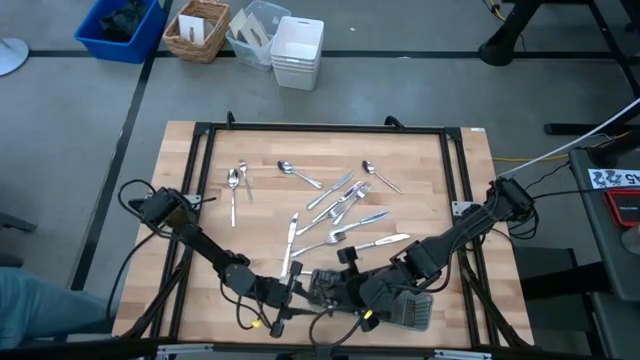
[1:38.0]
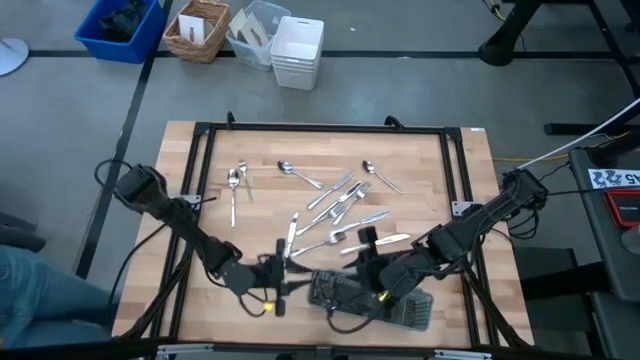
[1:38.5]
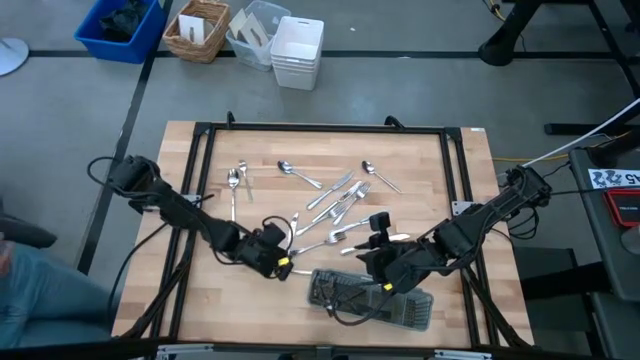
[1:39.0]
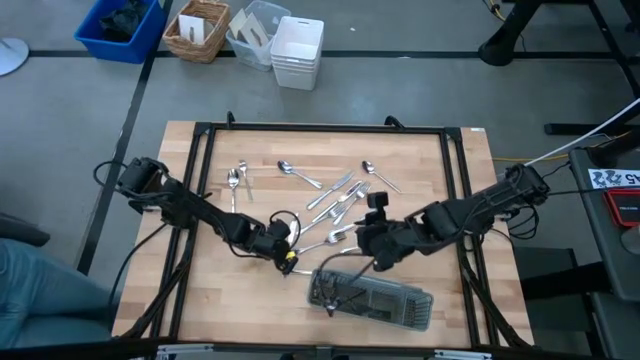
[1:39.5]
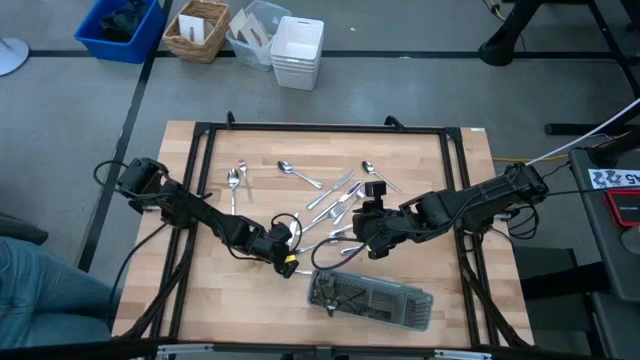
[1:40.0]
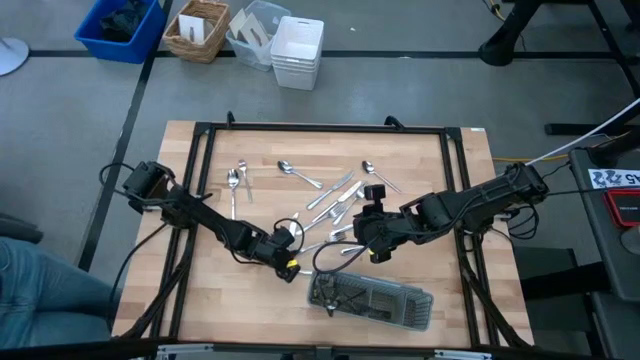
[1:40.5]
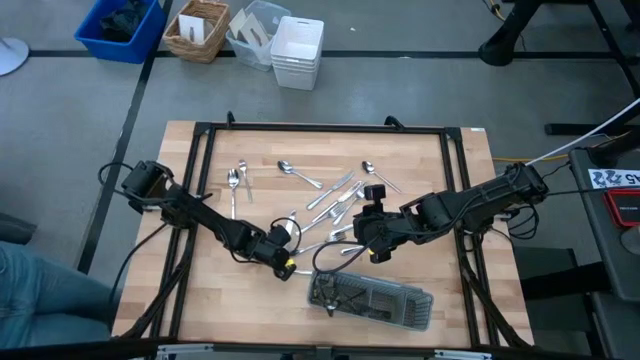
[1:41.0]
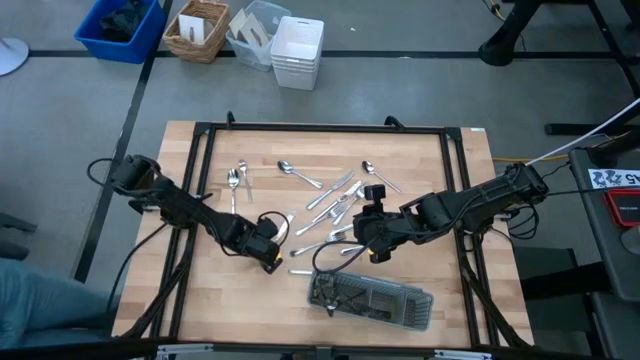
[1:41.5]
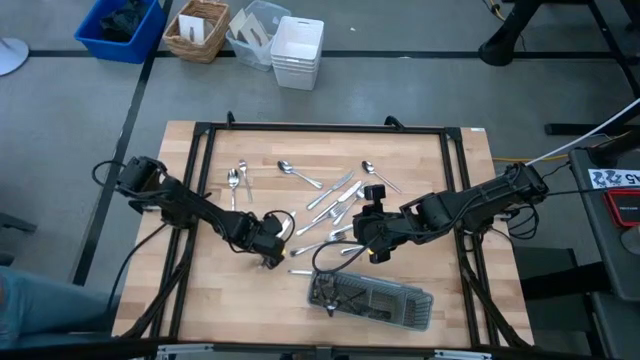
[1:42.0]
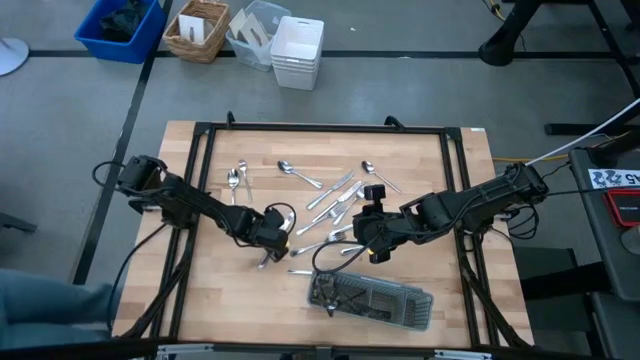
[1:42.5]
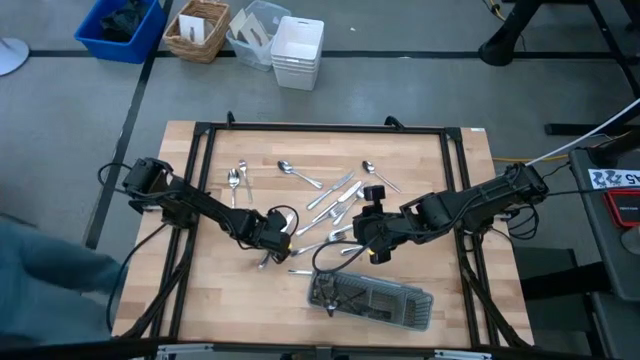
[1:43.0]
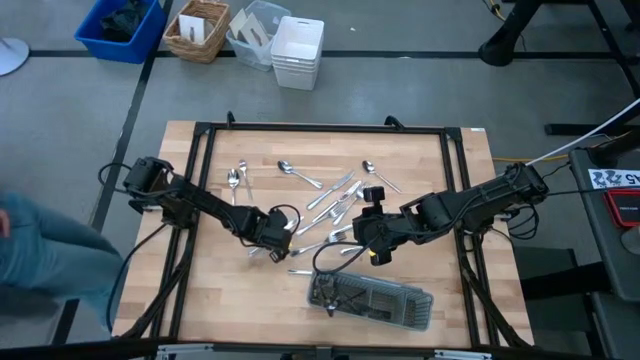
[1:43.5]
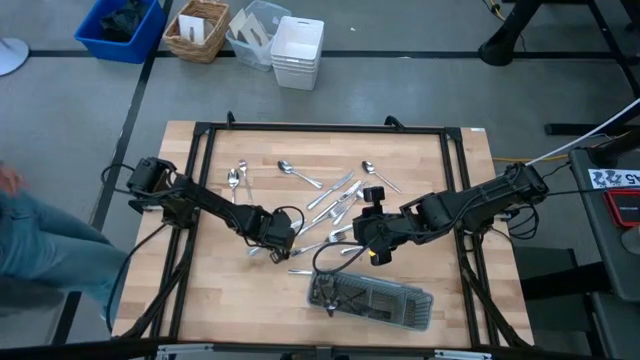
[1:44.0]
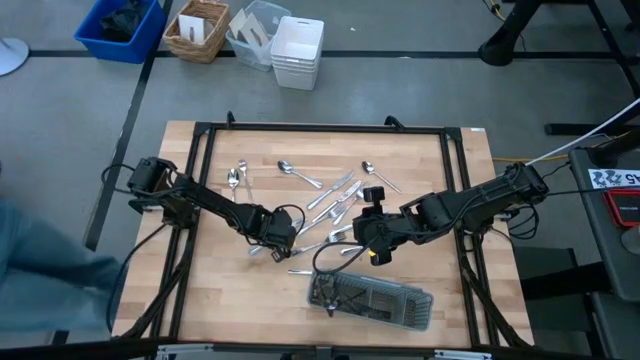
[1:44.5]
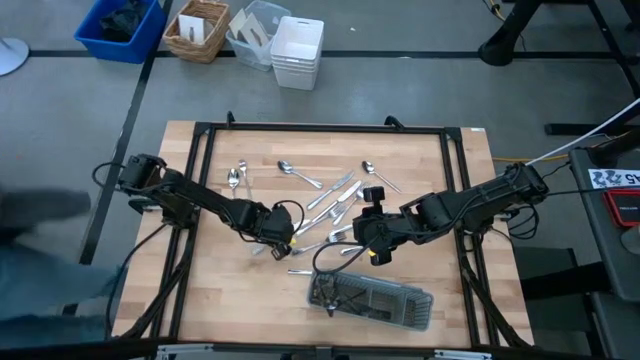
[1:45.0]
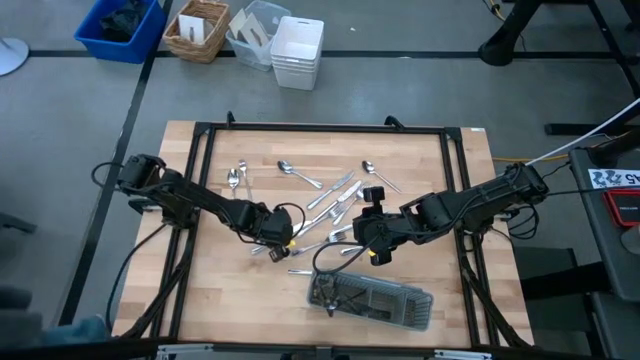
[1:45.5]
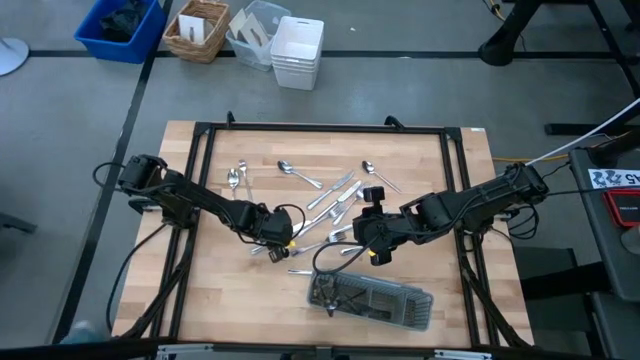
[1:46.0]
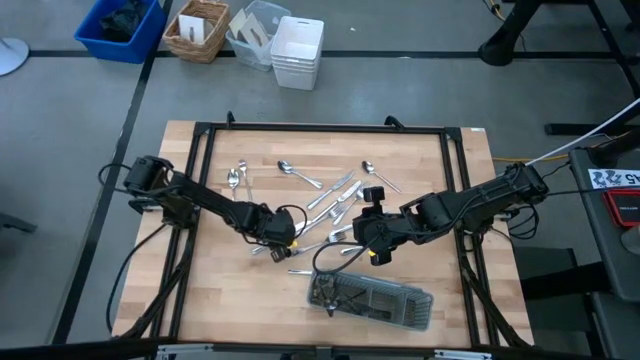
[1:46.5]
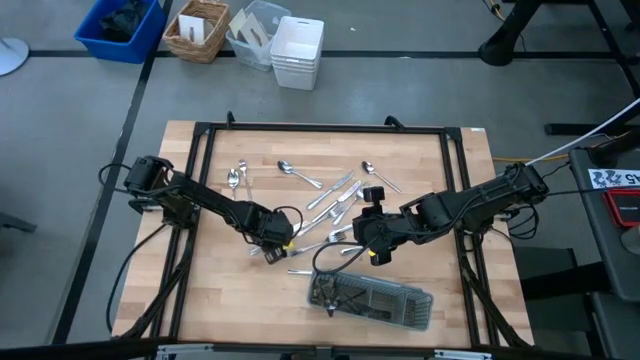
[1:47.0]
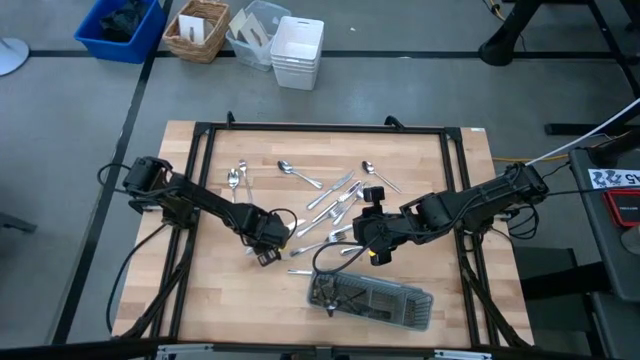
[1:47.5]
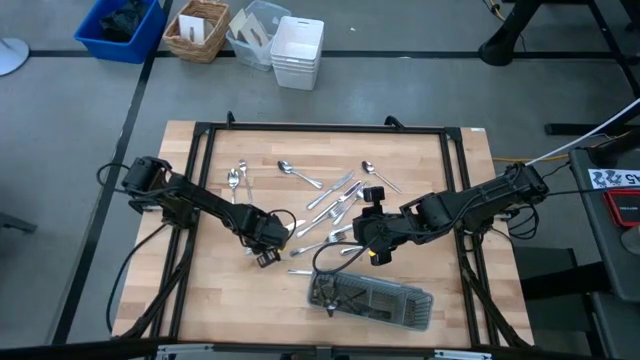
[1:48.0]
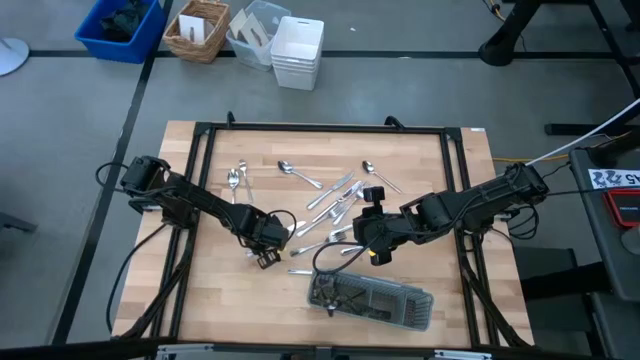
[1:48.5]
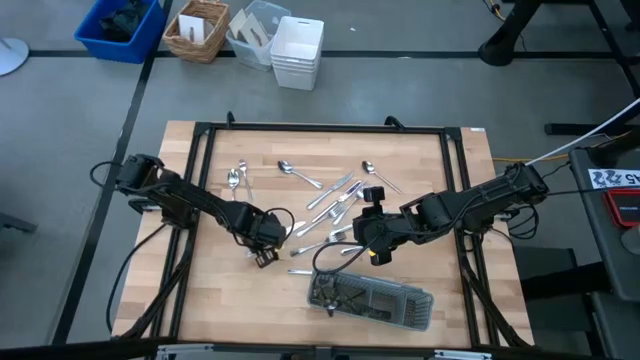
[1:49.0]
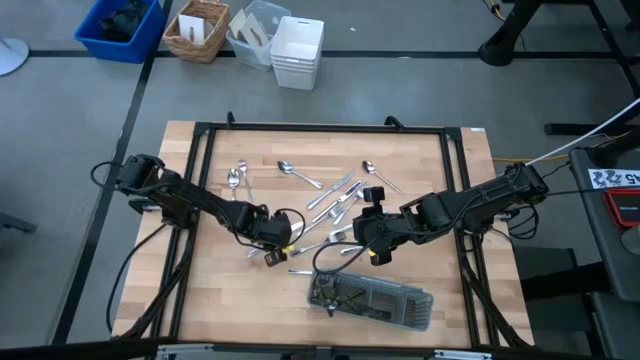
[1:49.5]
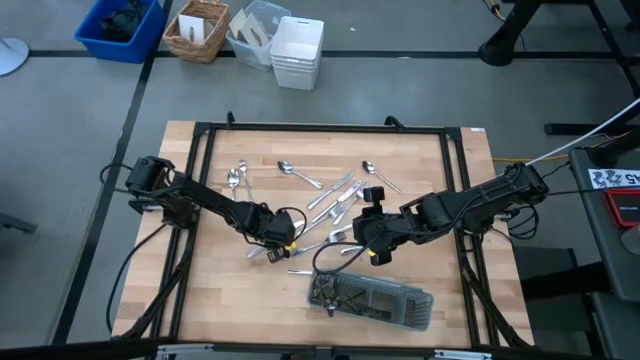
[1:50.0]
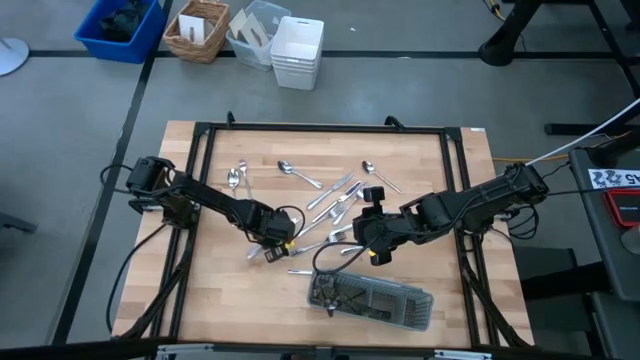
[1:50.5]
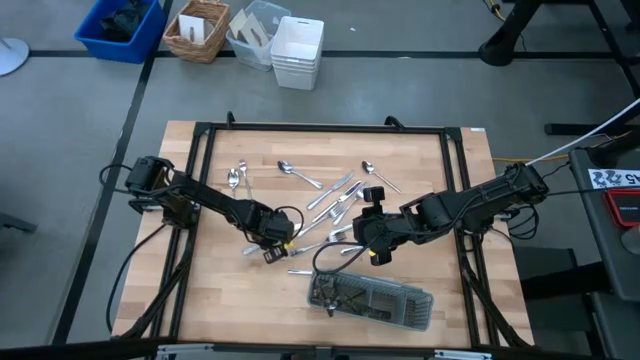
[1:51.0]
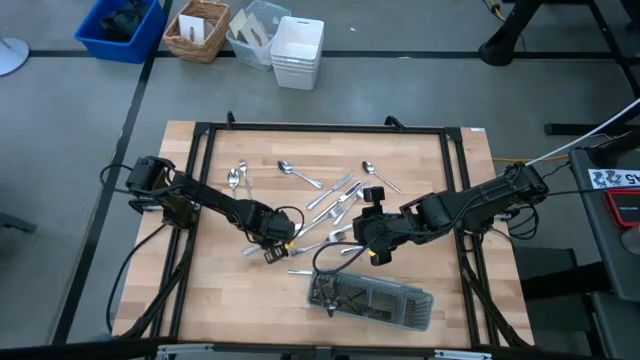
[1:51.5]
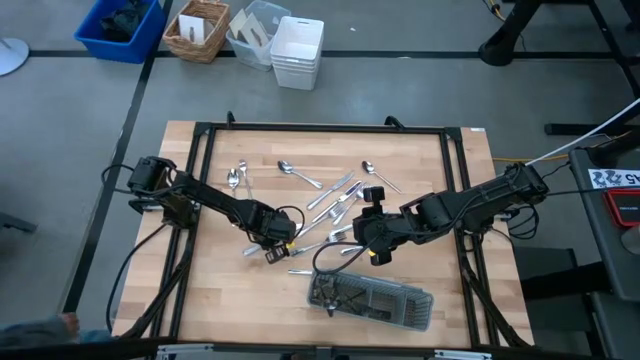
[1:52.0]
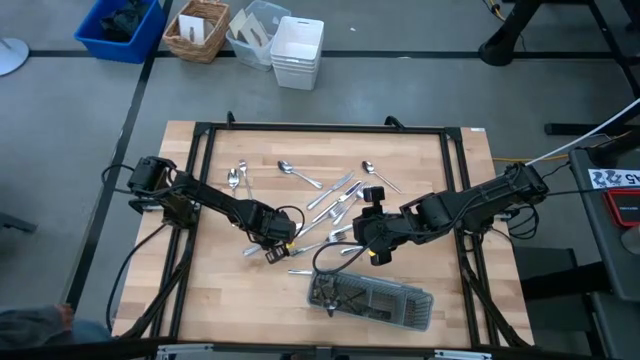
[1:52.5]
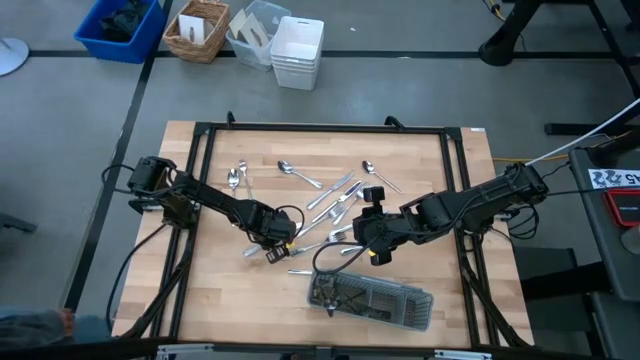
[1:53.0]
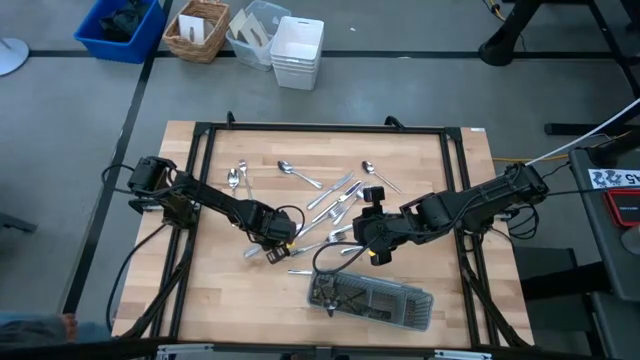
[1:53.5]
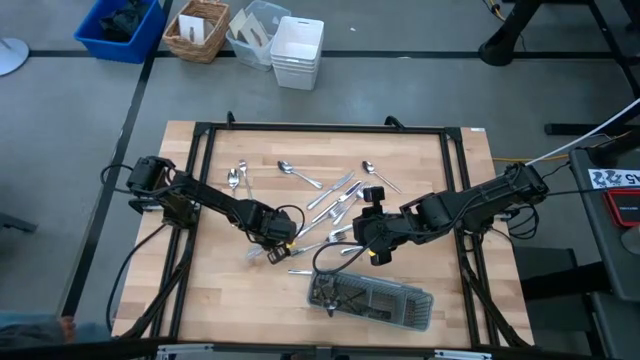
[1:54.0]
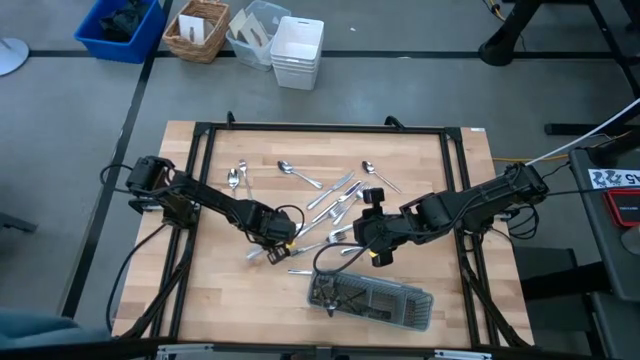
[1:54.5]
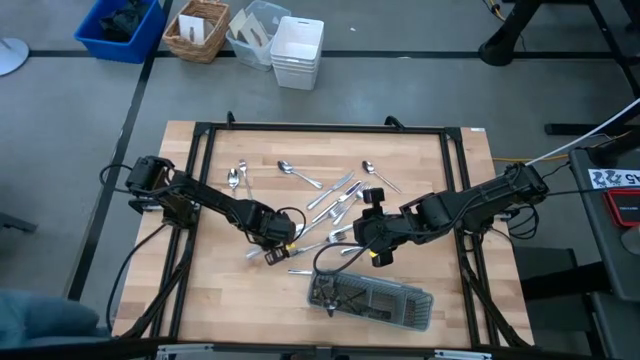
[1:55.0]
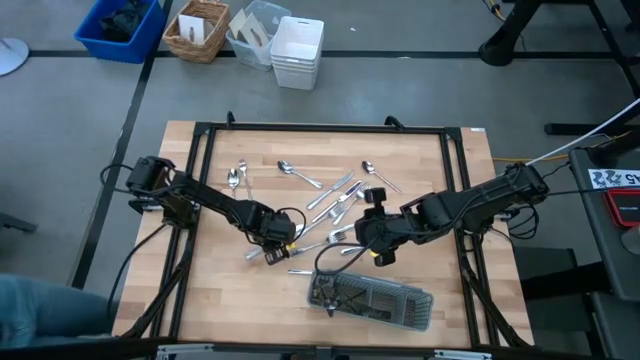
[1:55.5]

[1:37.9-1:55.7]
Task: Sort silverware
Put the knife into the gray silverware rack

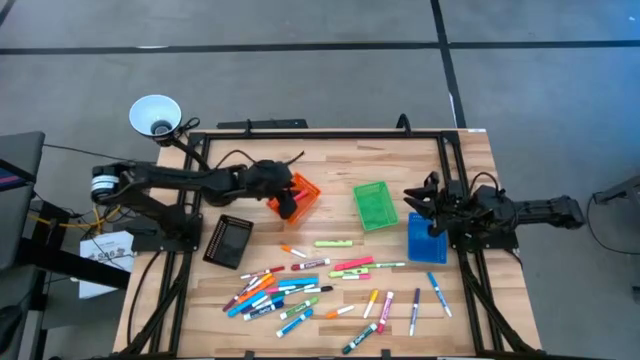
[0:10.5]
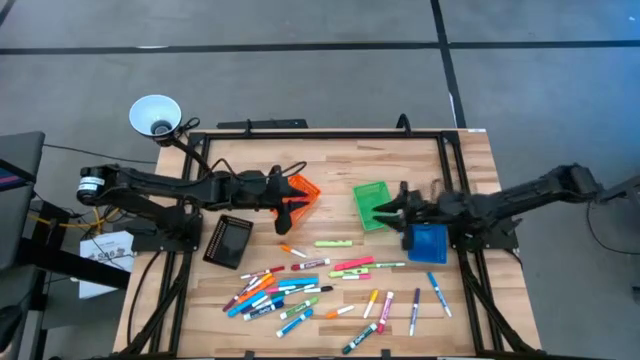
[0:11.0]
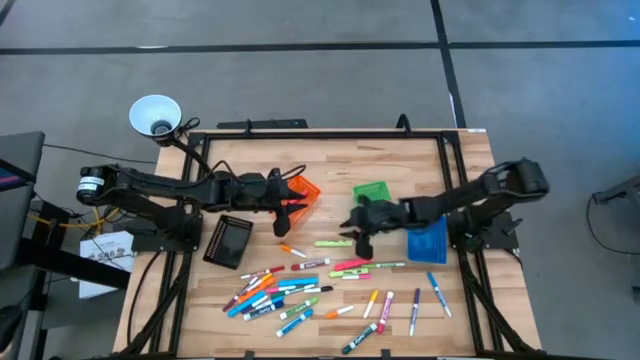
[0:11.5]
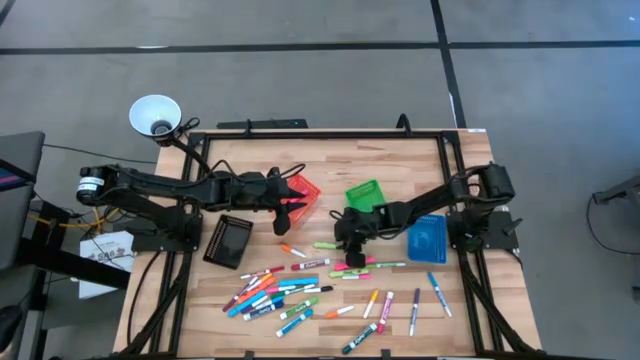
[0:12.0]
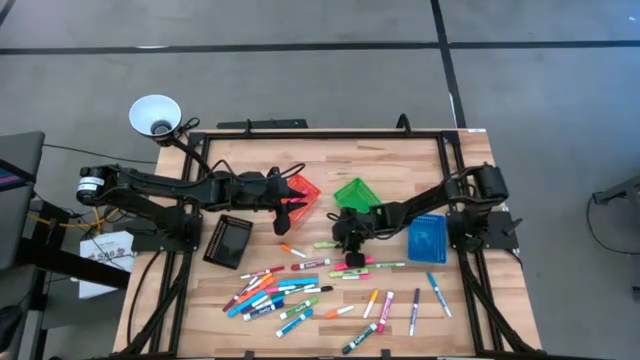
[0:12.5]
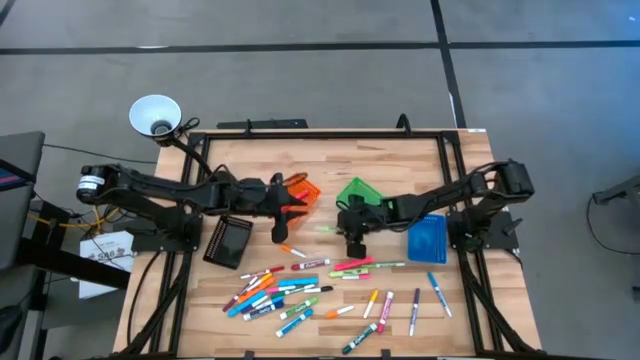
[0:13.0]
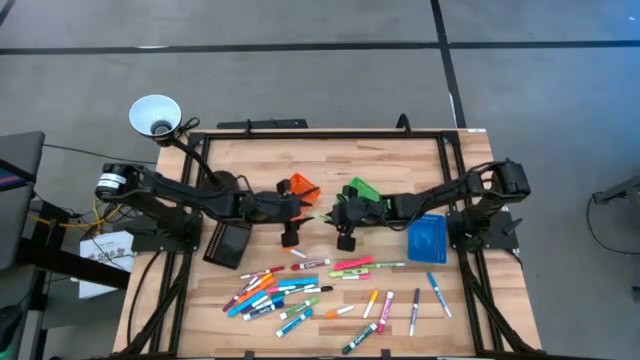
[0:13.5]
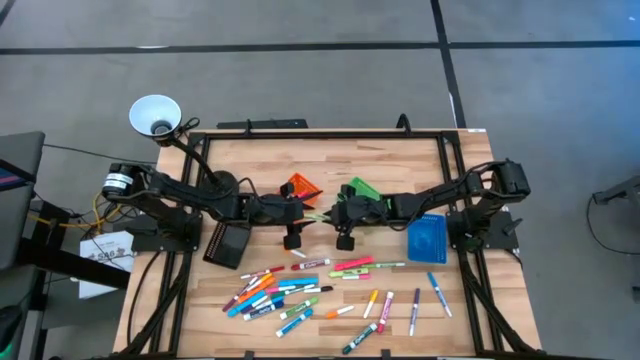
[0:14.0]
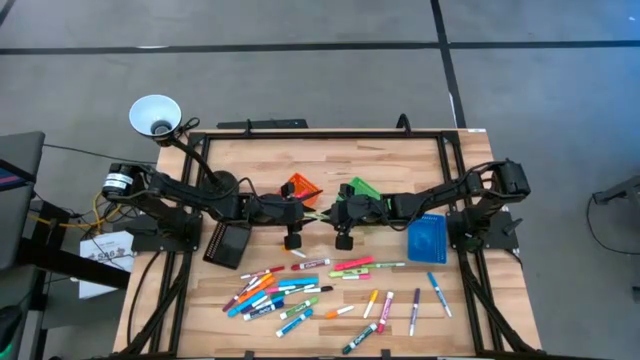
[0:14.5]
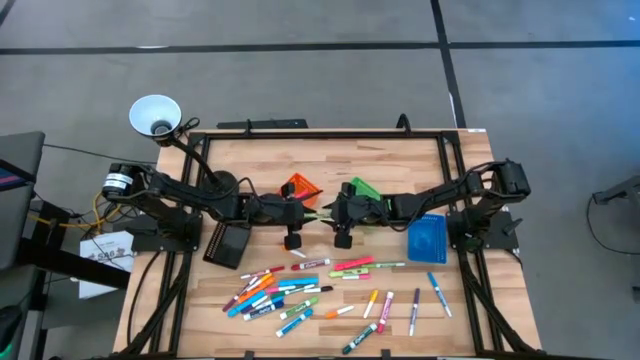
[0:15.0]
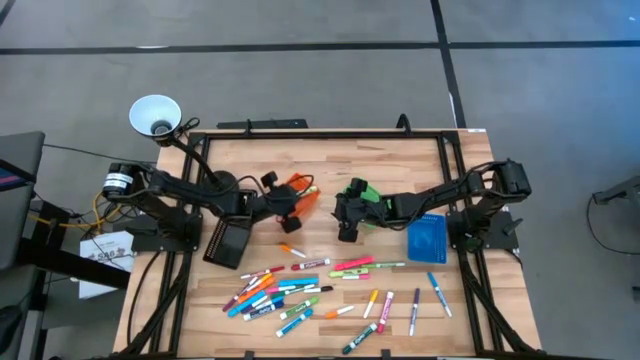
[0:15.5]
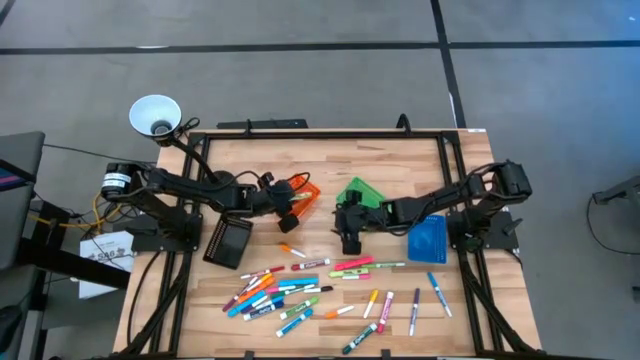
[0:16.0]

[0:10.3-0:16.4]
Task: Pick & Place Markers
Put the top light green highlighter pen into the orange bin
